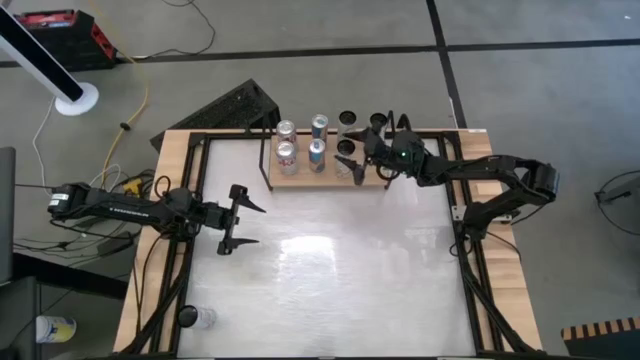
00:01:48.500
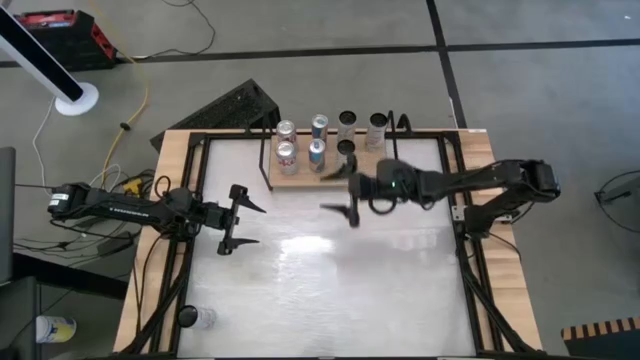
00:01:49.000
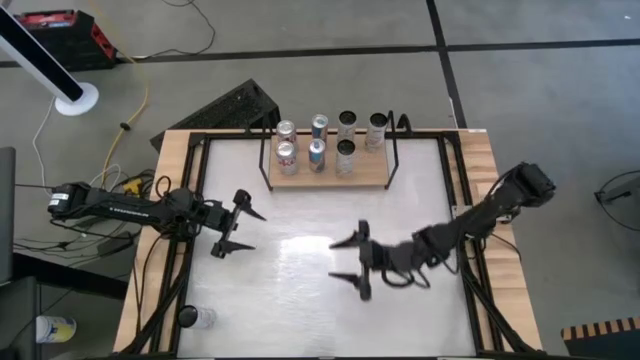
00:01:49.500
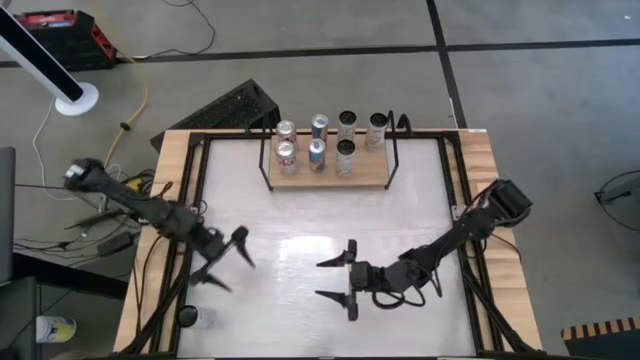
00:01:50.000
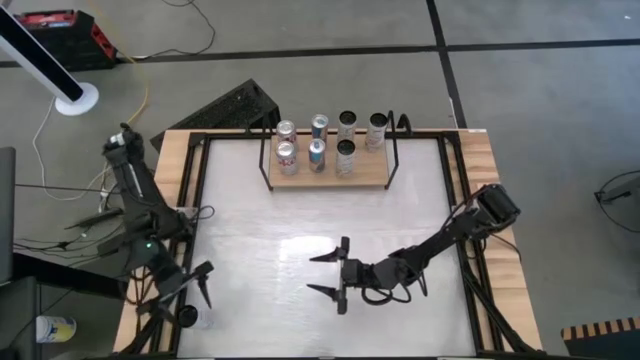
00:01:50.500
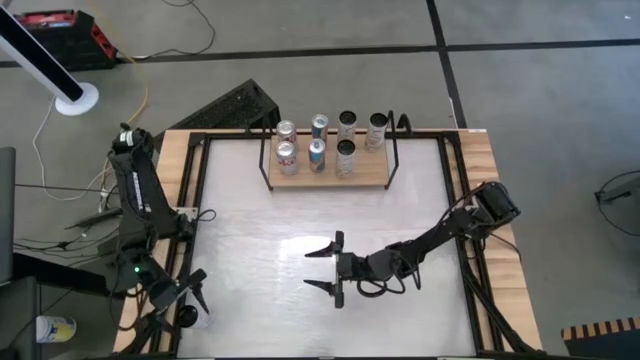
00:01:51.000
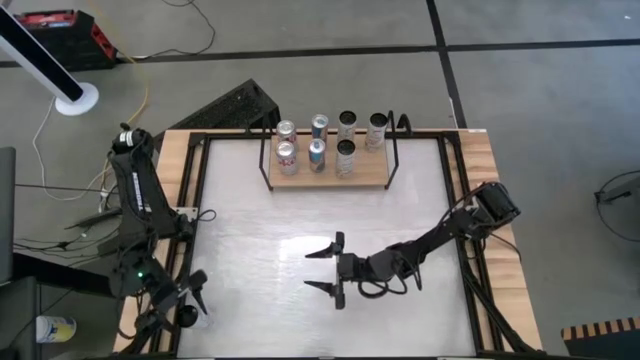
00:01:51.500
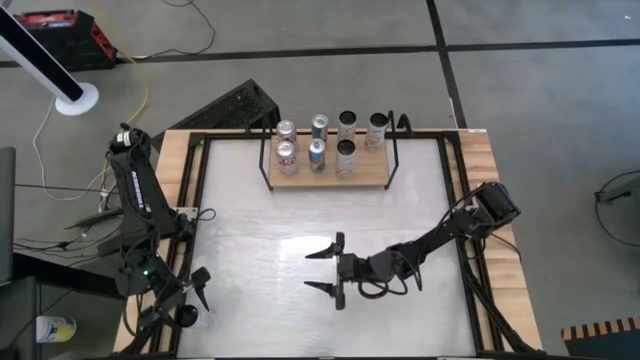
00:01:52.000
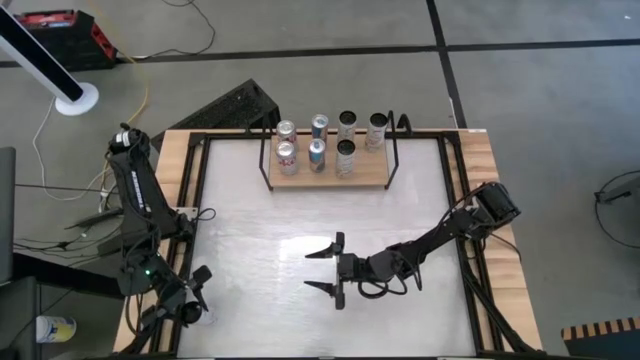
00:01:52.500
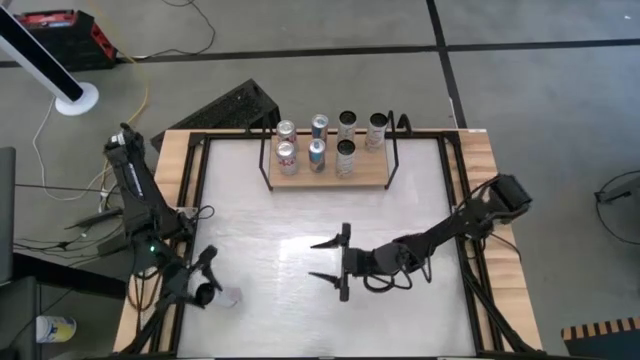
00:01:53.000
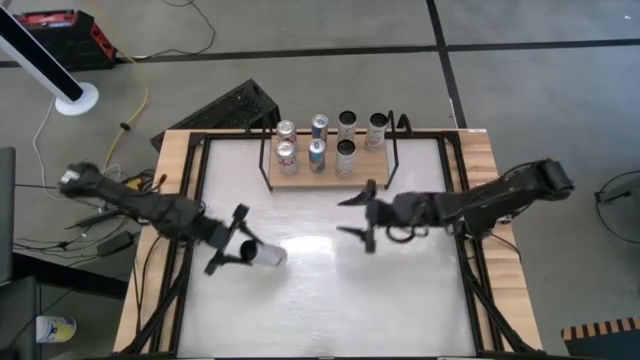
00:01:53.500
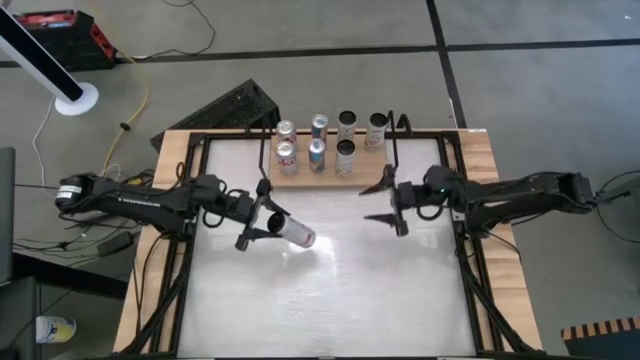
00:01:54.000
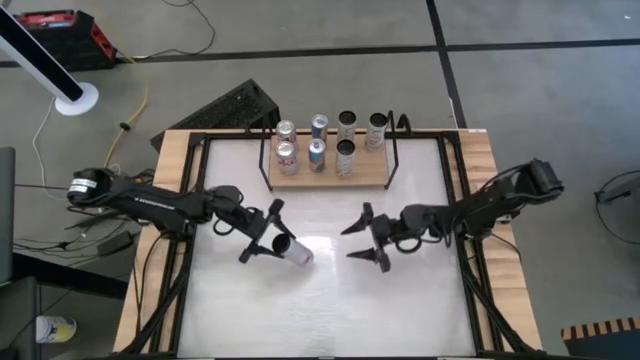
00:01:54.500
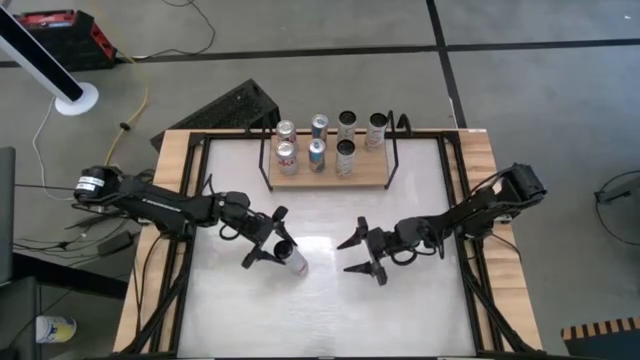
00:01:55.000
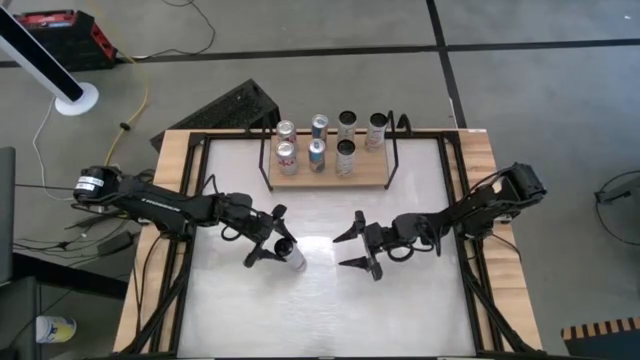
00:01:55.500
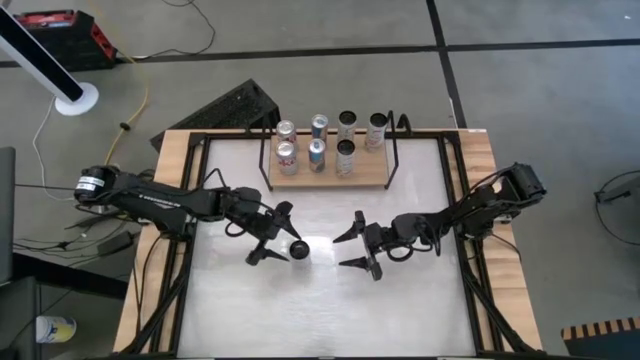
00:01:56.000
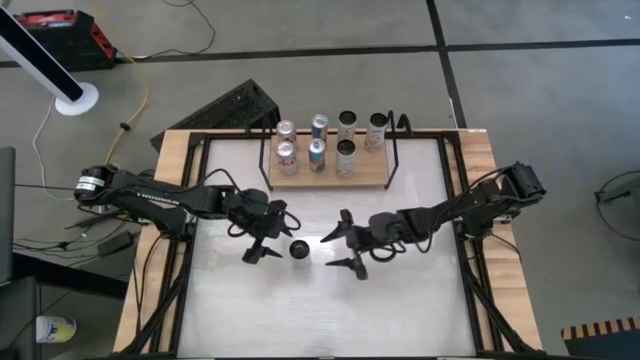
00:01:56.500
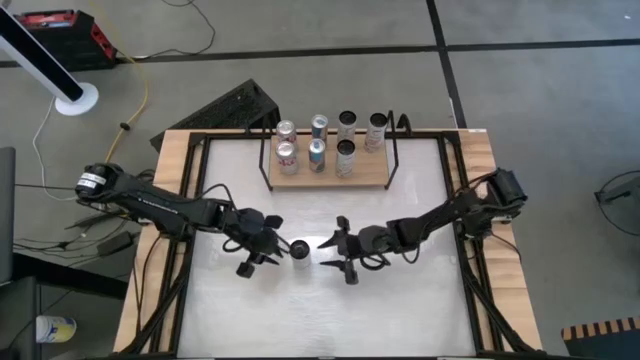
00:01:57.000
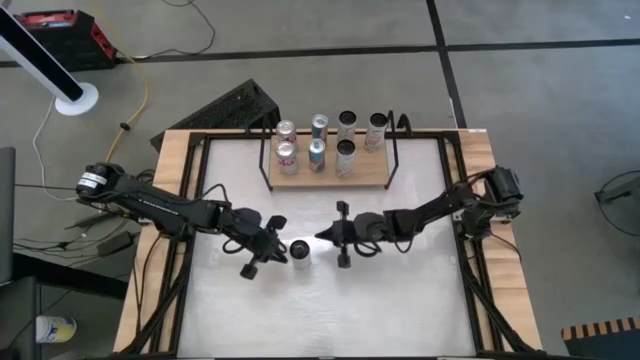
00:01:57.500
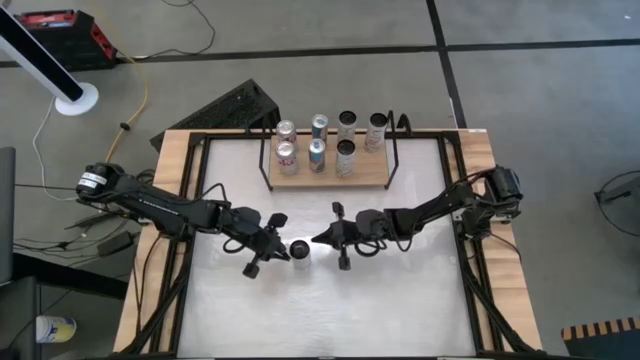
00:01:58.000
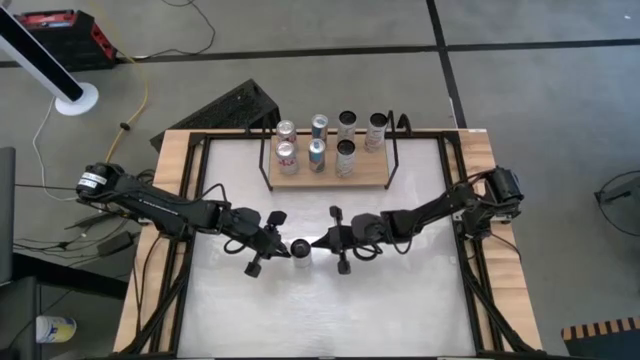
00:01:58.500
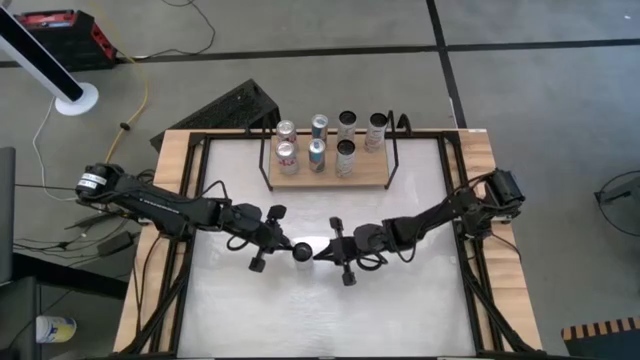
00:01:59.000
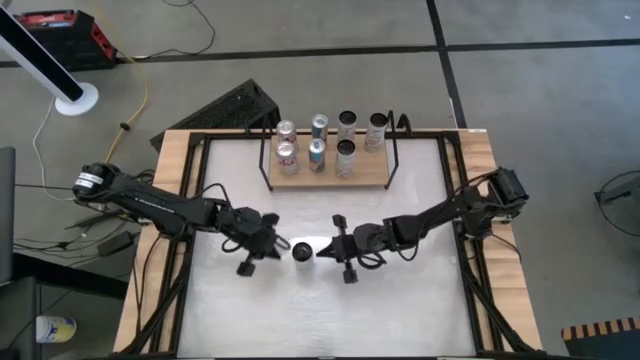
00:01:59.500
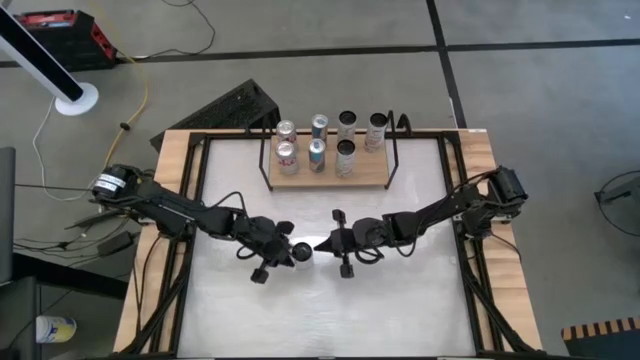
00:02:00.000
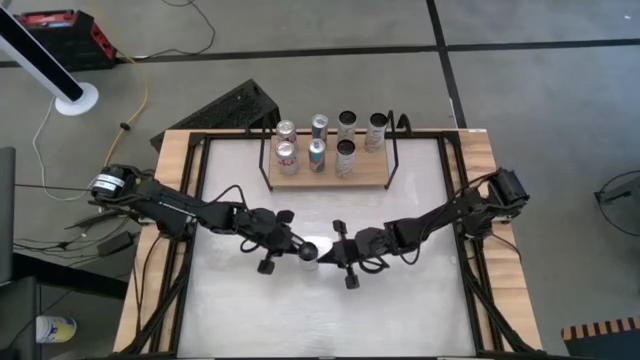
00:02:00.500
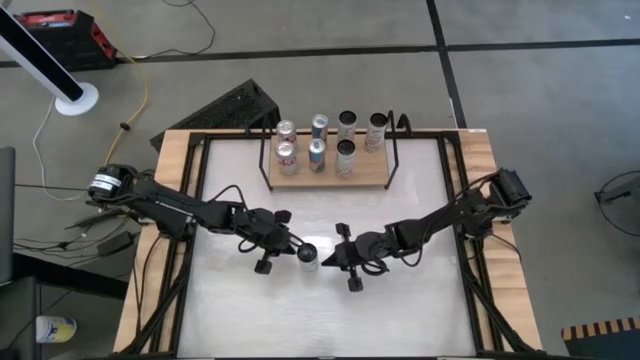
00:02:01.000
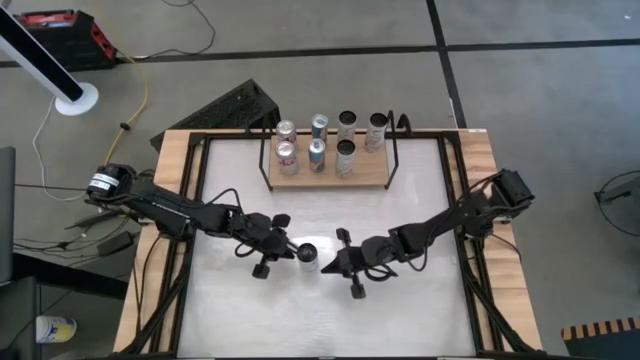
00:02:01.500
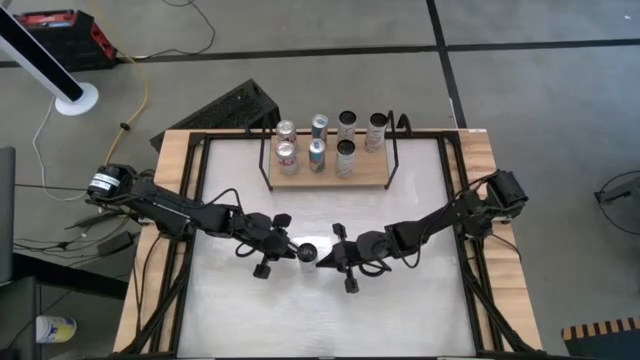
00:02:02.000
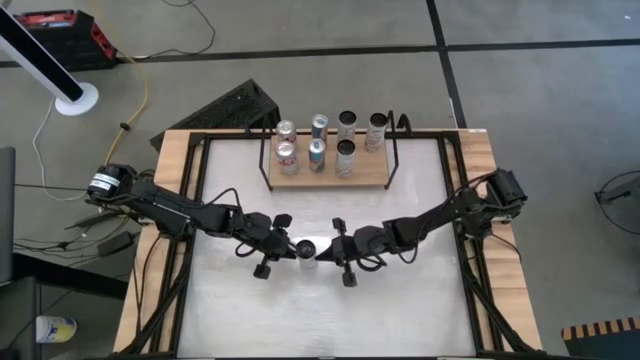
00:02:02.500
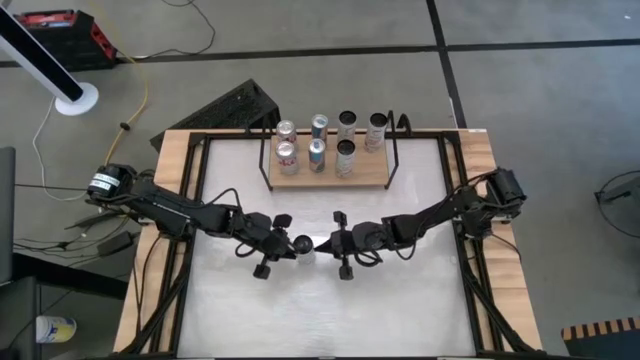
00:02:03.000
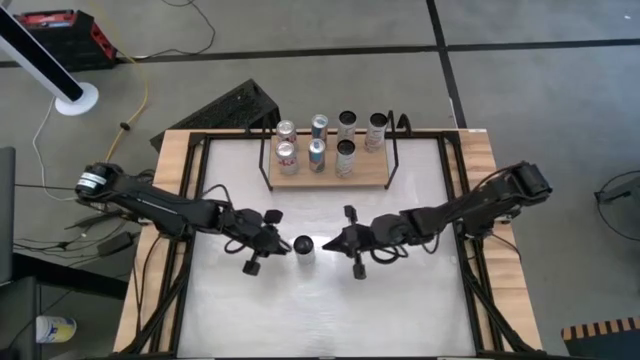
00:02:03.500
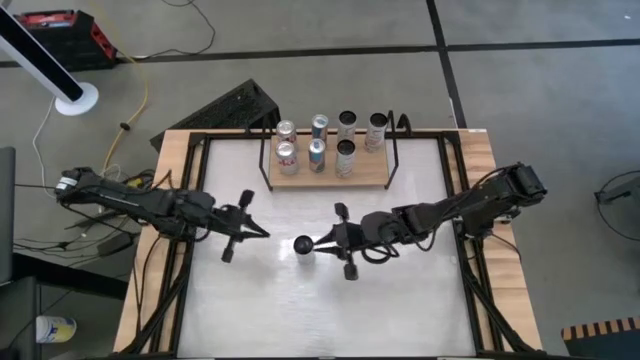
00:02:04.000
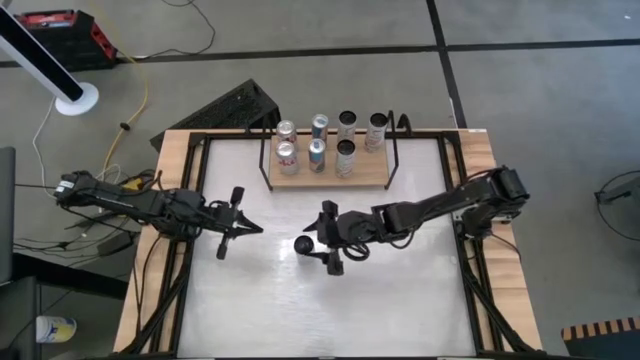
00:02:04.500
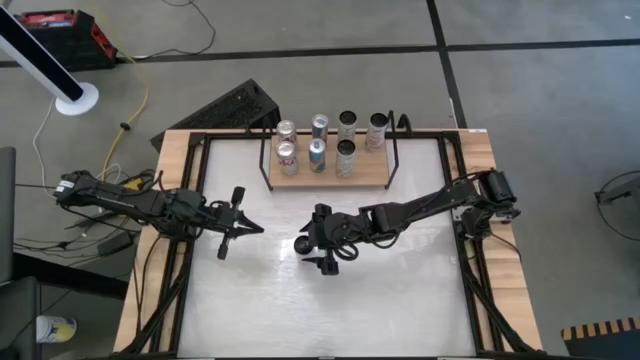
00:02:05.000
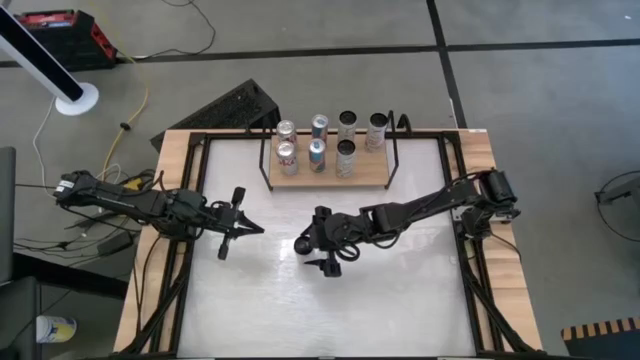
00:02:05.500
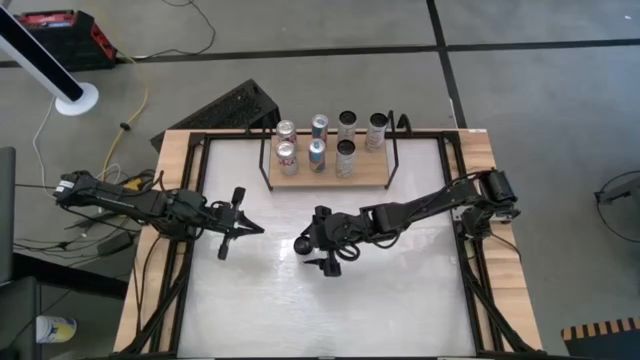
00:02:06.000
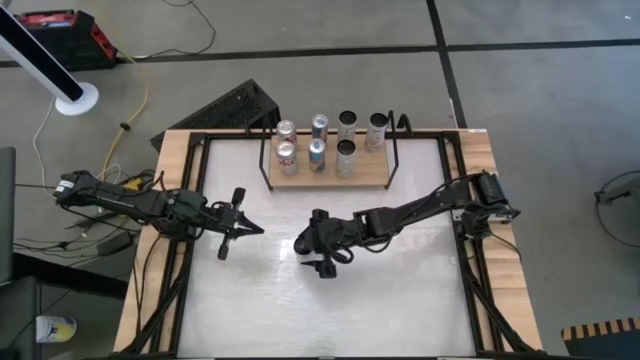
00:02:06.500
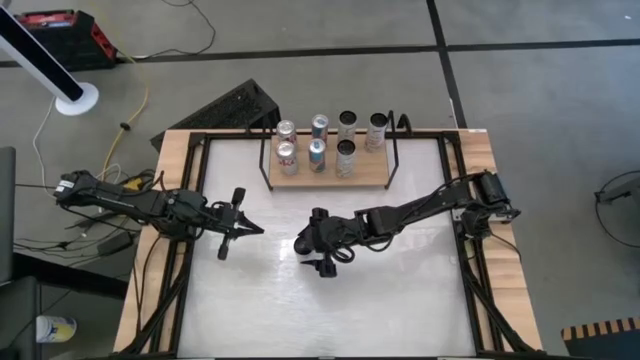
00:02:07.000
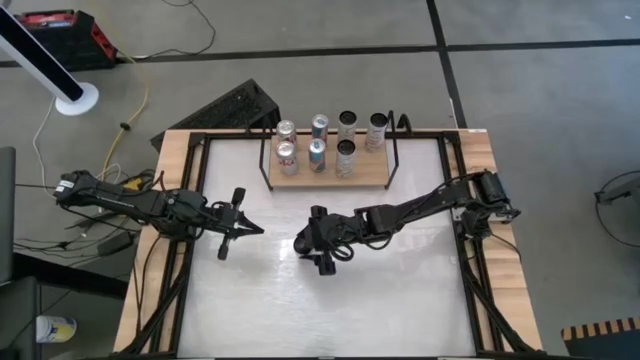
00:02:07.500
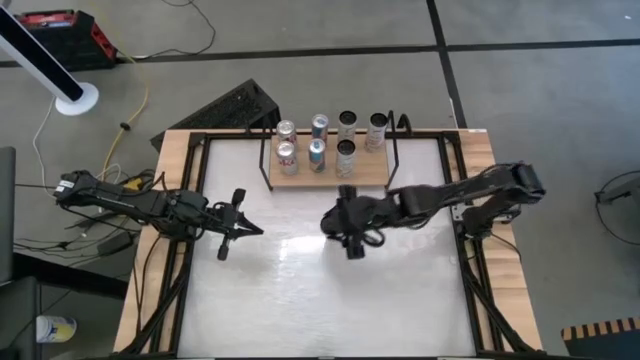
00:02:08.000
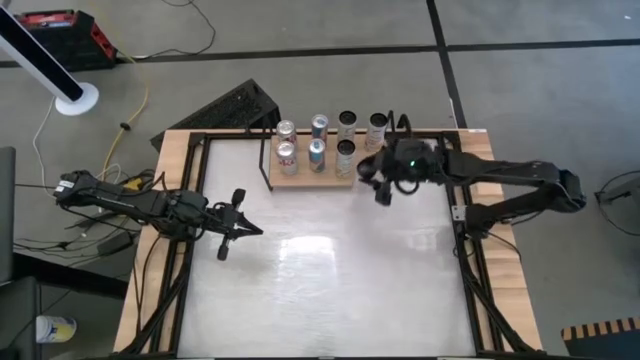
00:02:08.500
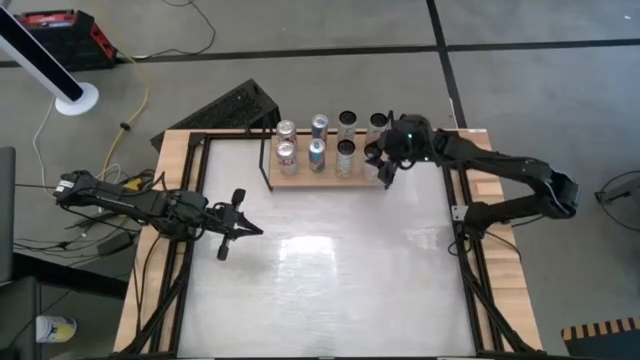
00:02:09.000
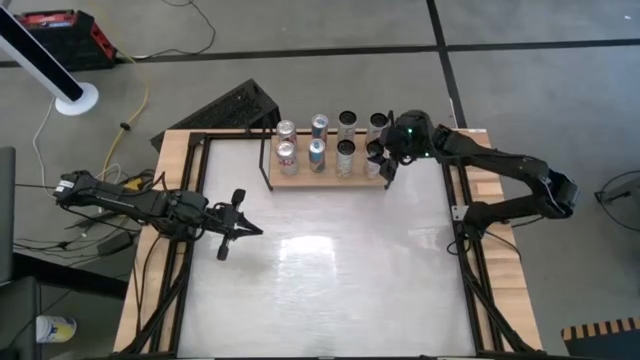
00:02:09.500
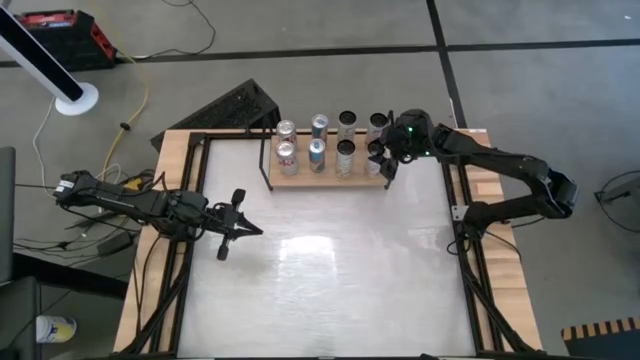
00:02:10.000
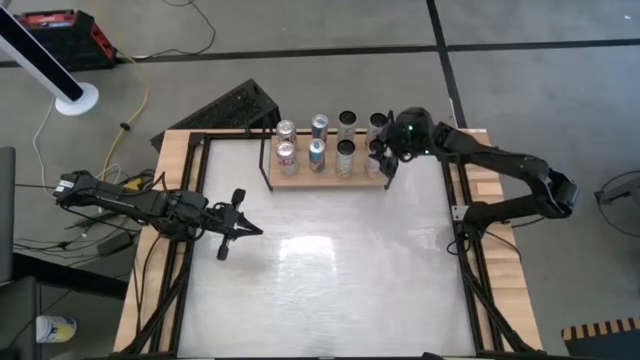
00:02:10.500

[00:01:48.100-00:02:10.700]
Task: Place canned beverage on shelf
Put the white-pink soda can on the shelf aligned with the other white-pink soda can on the shelf
